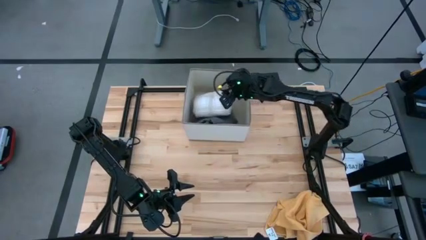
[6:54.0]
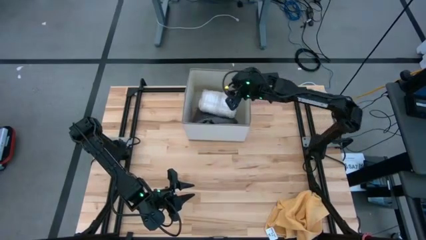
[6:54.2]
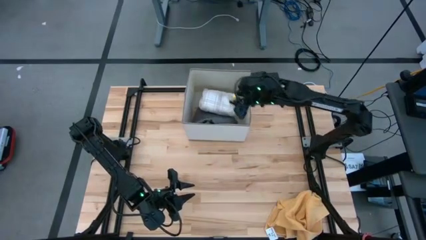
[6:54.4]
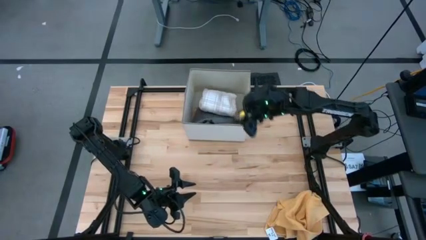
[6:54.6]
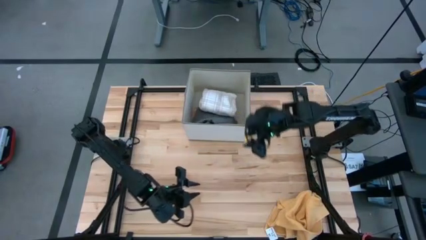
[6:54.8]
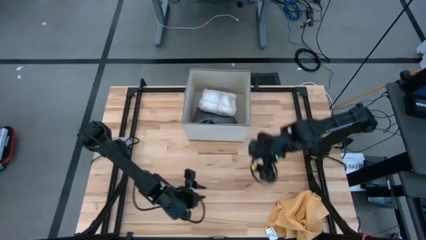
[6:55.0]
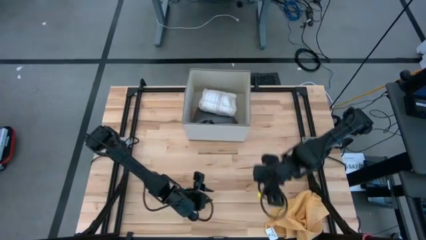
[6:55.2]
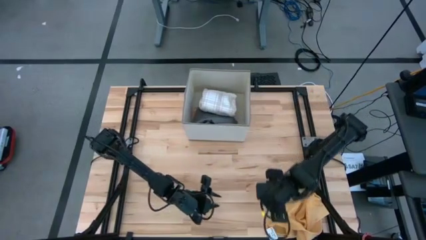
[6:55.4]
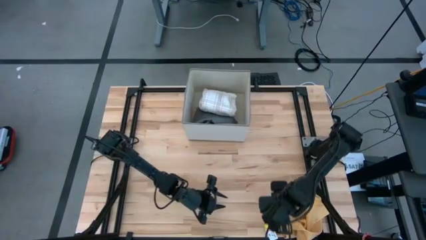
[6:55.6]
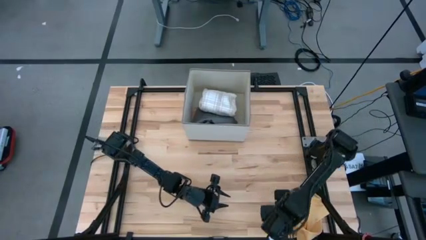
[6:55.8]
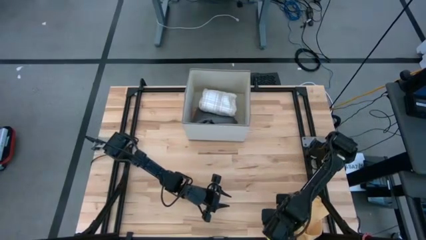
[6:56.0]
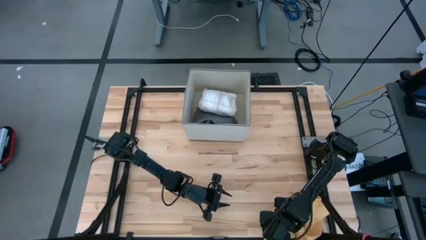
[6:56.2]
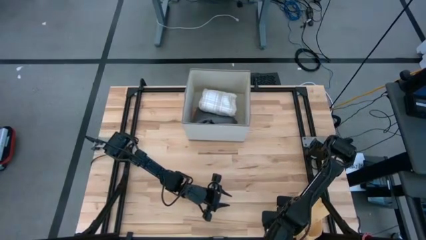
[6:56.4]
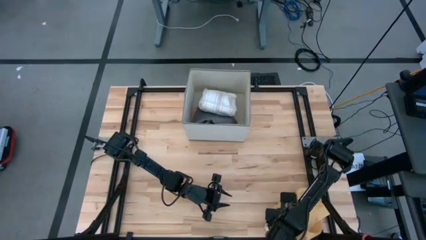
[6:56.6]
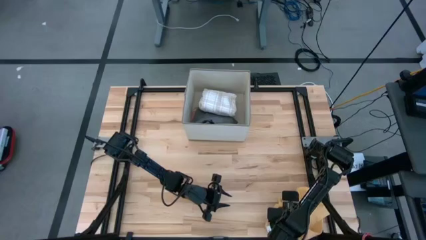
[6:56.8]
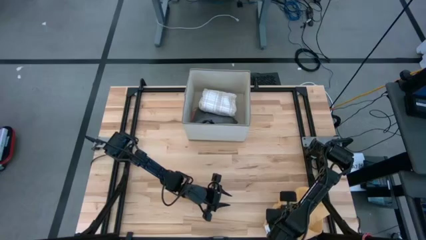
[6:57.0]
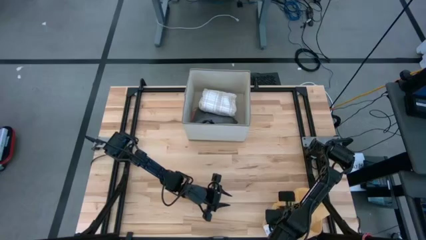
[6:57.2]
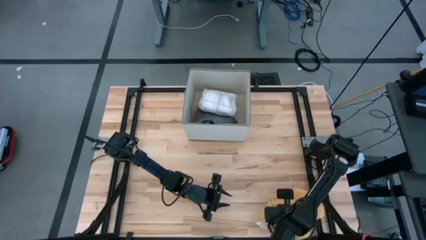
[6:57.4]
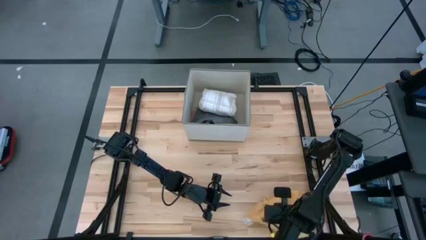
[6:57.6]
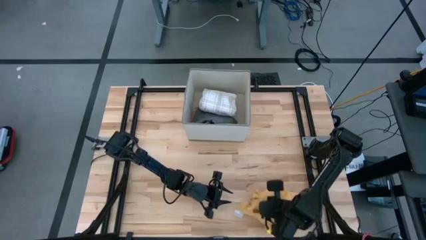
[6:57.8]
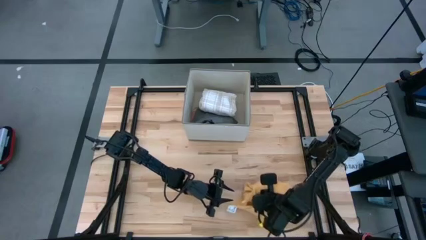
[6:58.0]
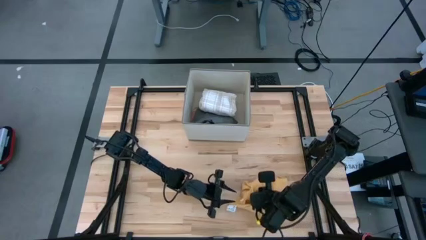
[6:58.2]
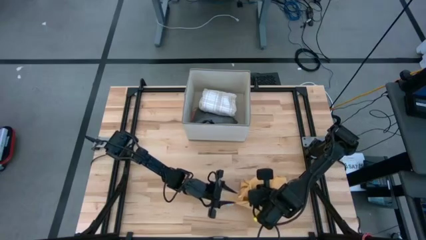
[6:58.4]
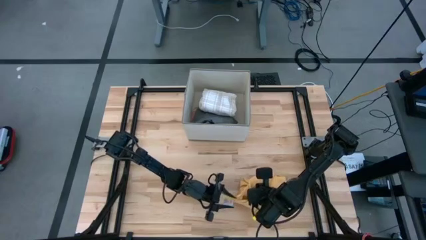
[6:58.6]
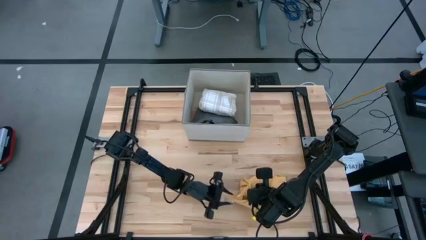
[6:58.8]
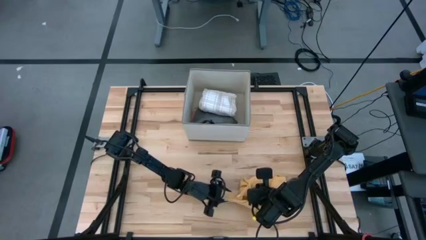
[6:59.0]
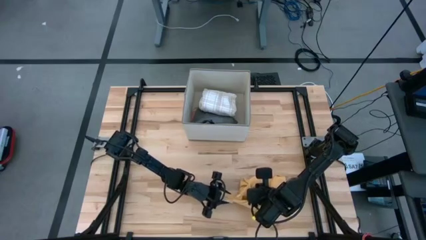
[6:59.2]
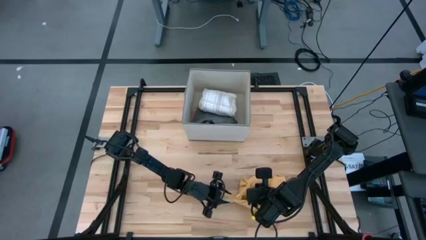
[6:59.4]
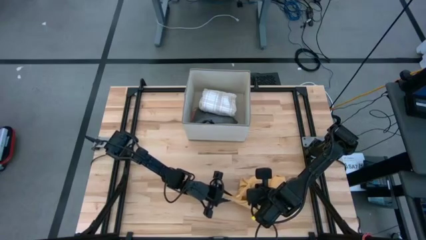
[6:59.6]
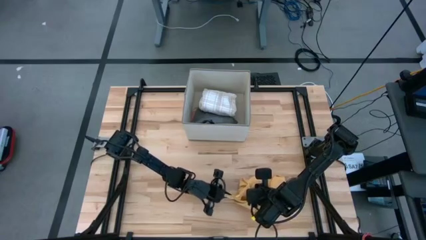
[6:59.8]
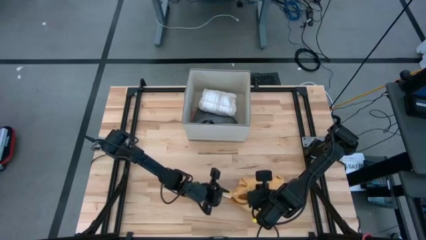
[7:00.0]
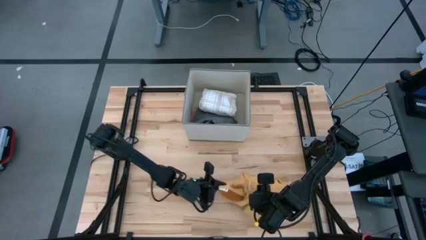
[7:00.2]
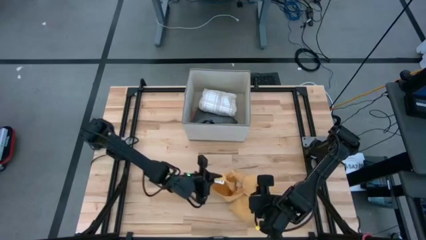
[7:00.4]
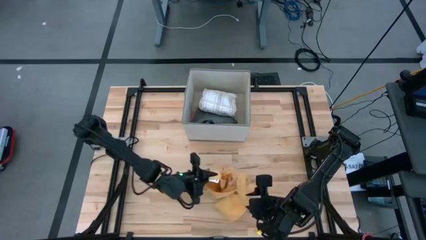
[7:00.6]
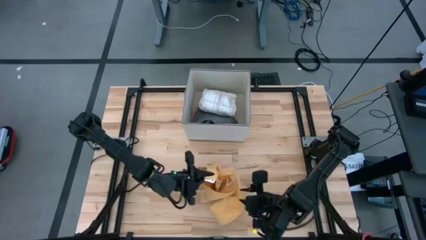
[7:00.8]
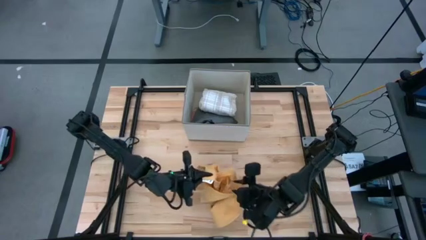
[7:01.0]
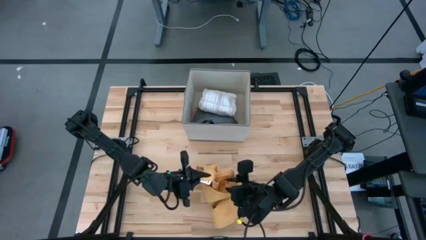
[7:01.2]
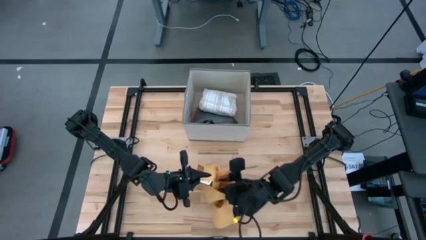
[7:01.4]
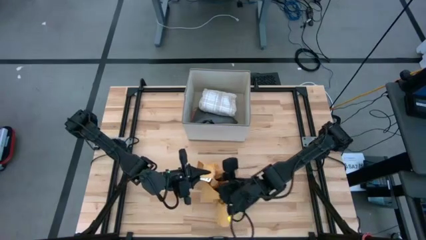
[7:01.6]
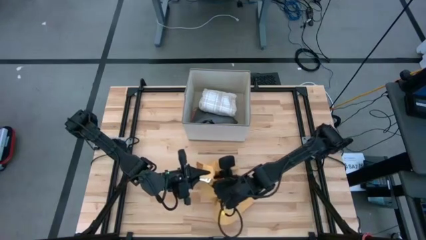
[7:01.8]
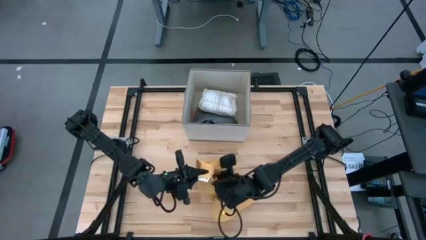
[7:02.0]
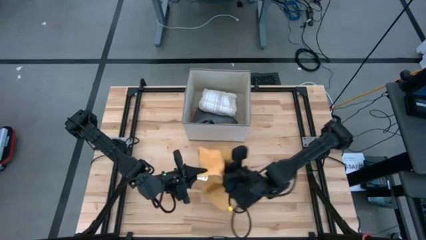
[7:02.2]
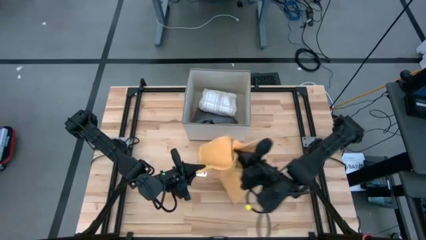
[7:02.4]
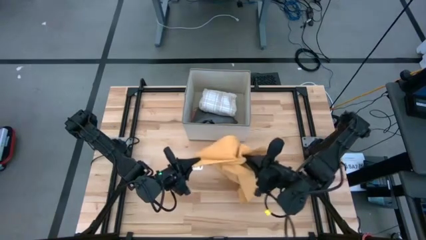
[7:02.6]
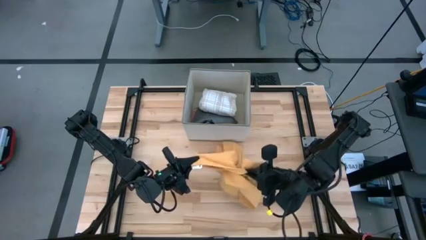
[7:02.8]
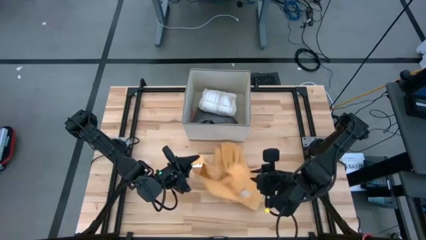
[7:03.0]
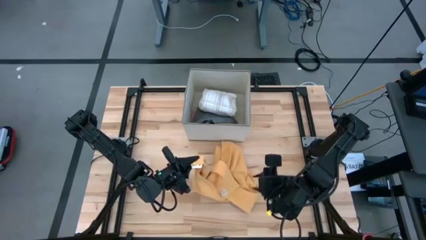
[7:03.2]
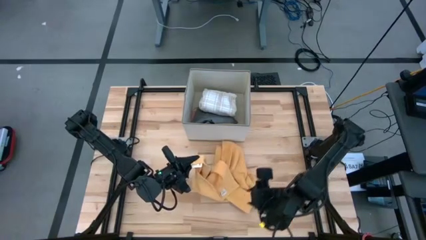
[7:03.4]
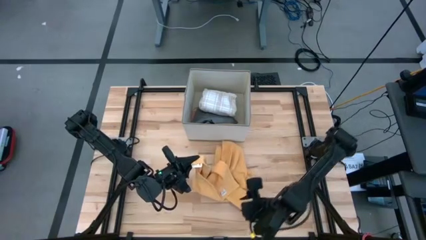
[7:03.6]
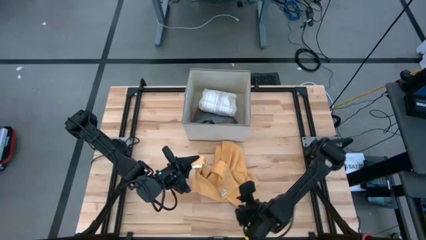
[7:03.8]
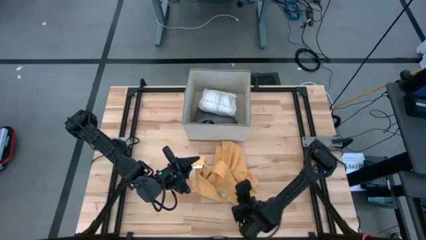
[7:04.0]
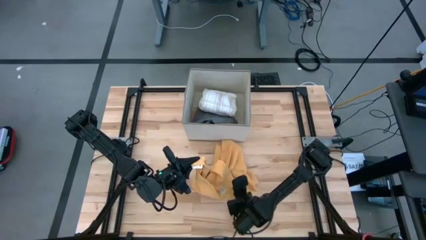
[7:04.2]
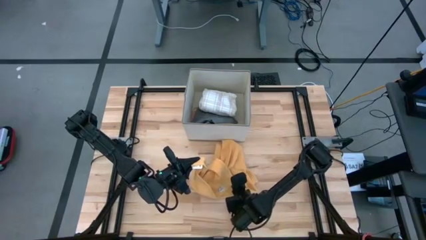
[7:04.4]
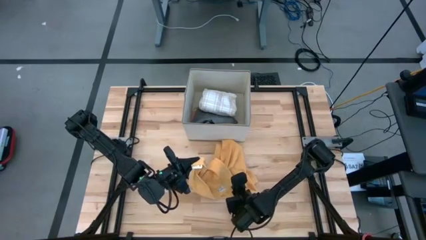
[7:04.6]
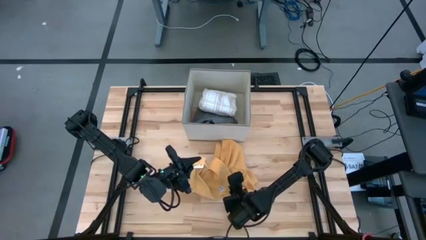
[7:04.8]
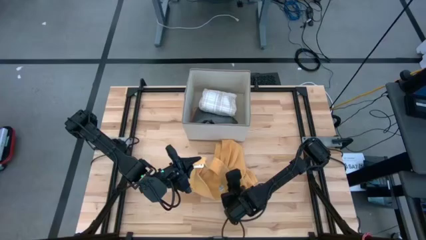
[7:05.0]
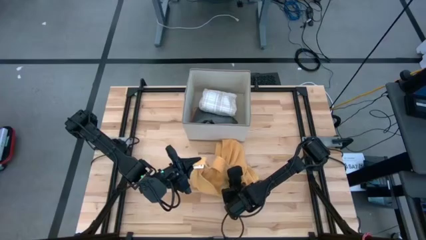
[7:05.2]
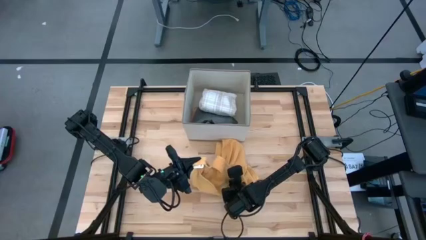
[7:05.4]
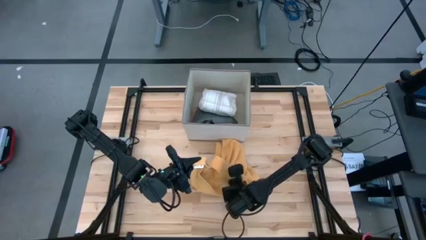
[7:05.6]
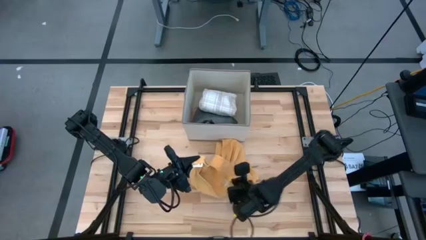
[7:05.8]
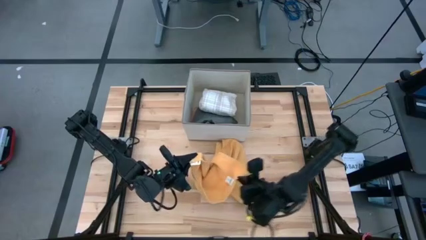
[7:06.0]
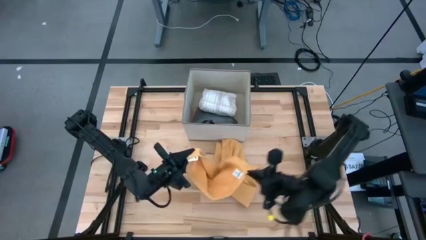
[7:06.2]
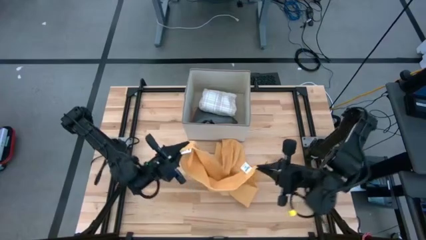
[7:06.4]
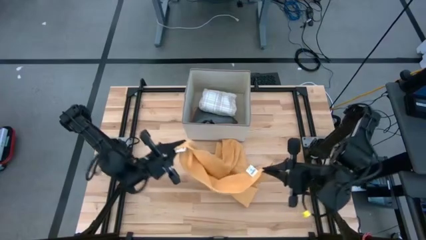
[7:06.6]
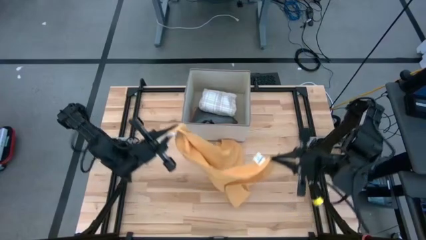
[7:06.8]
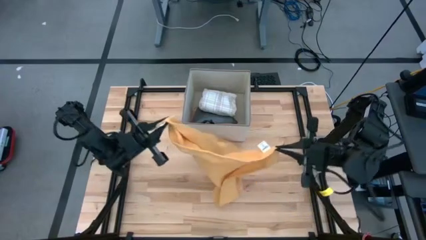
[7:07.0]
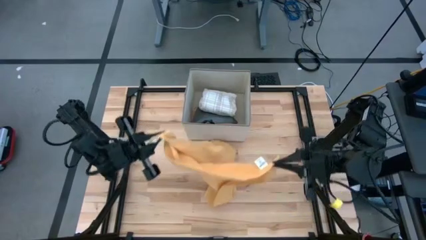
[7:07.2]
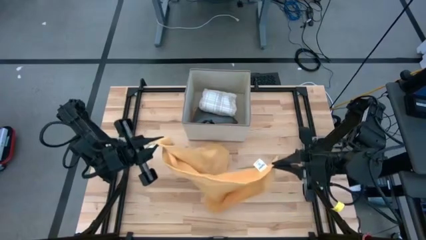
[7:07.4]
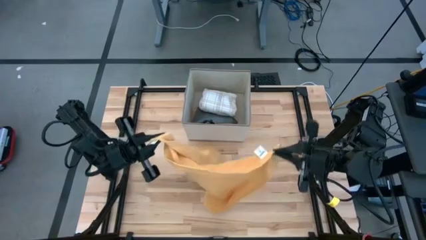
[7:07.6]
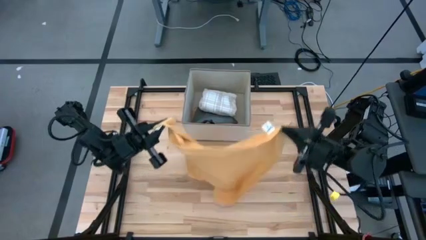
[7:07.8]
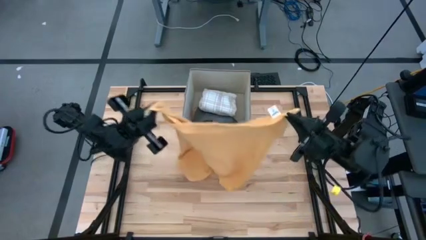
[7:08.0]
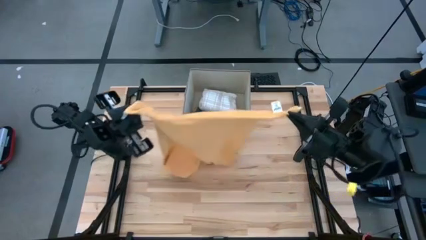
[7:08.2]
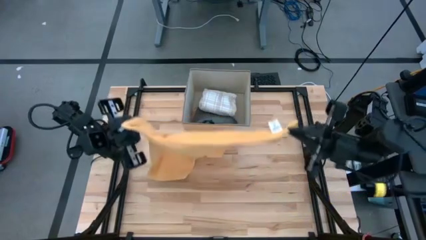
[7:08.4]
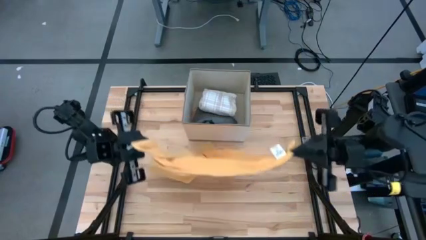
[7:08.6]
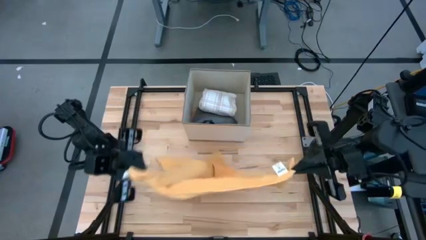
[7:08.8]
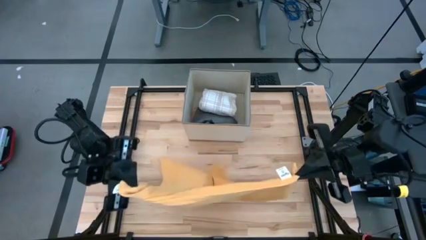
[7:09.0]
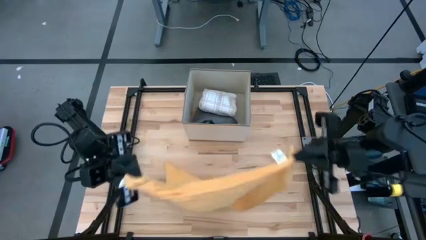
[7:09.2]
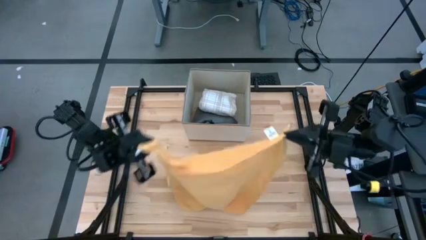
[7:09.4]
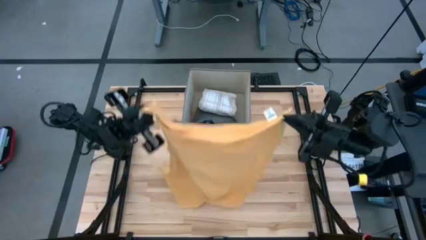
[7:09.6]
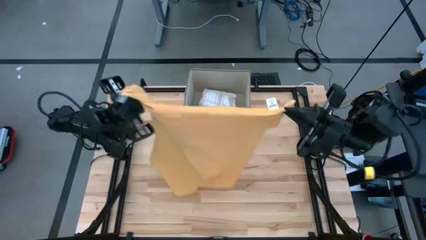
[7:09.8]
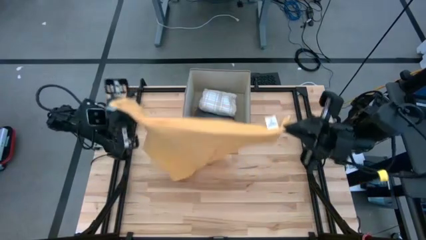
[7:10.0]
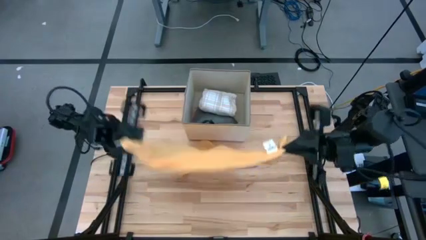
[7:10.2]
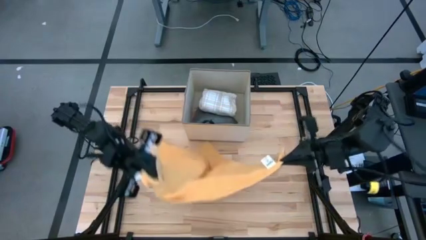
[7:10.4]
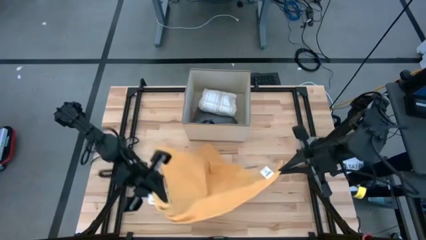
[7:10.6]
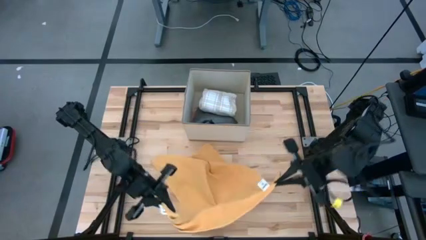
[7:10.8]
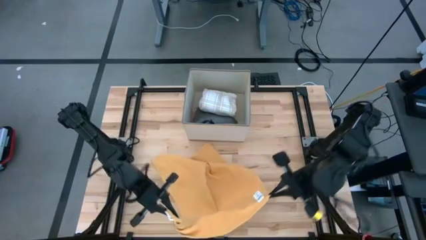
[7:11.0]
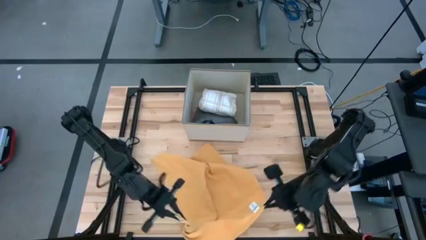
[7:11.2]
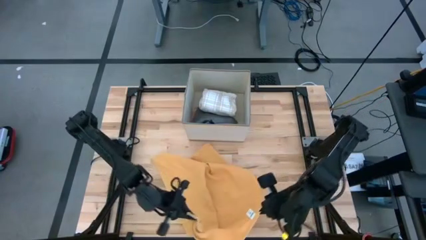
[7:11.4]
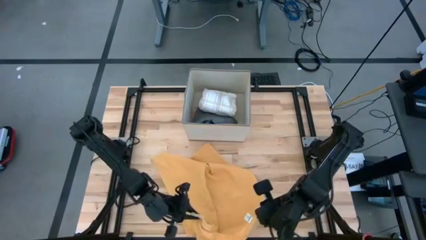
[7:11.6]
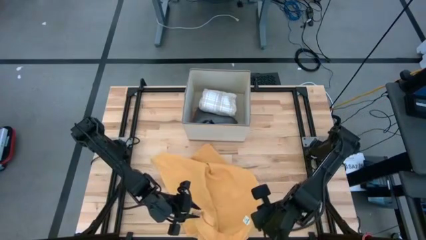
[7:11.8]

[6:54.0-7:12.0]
Task: Fold towel
Fold the orange towel
